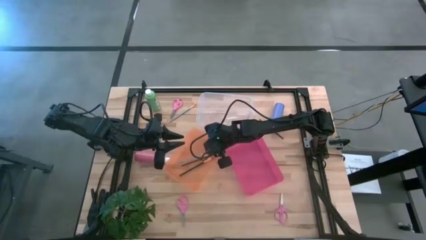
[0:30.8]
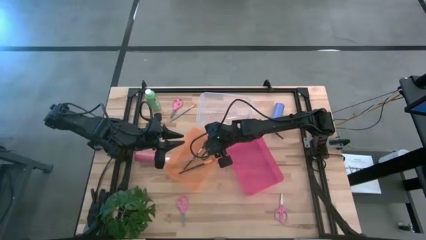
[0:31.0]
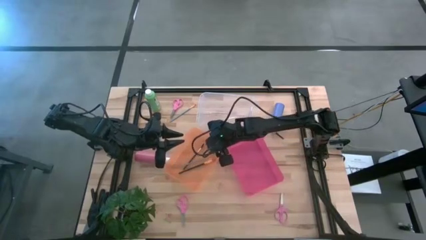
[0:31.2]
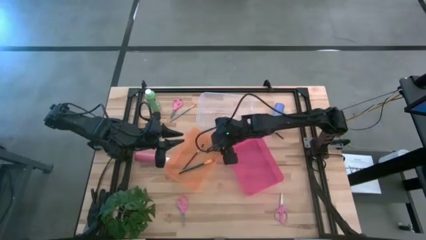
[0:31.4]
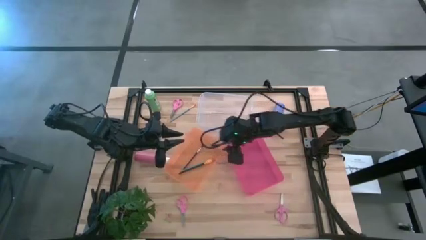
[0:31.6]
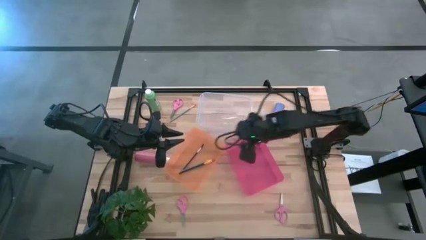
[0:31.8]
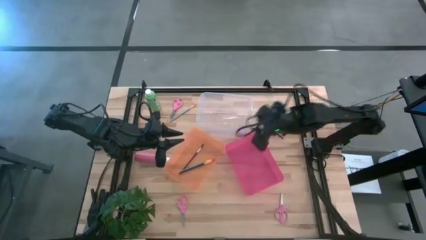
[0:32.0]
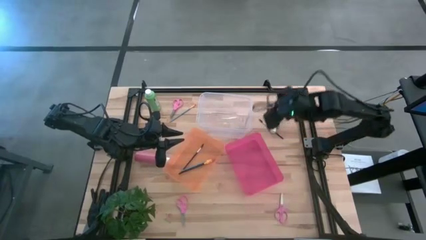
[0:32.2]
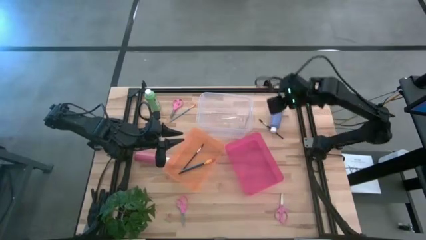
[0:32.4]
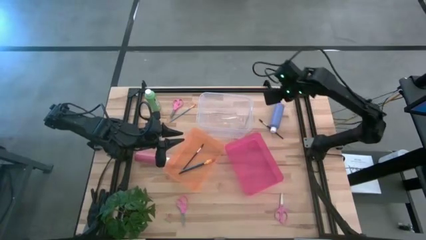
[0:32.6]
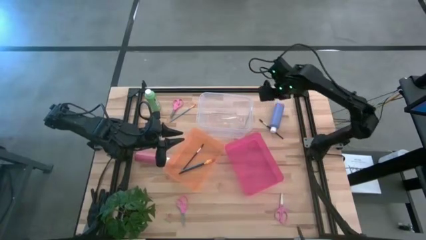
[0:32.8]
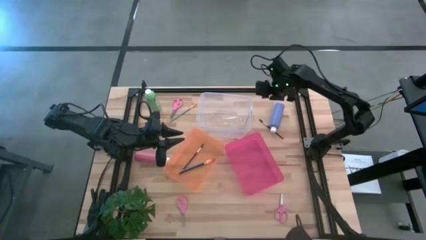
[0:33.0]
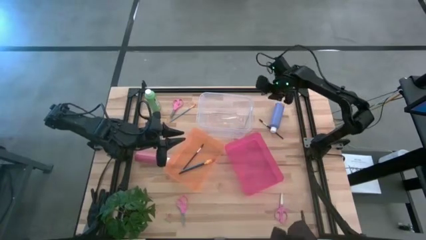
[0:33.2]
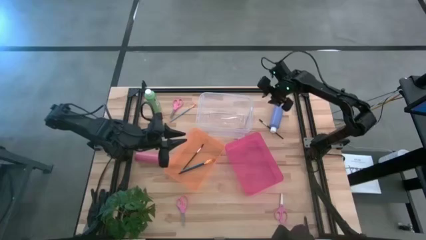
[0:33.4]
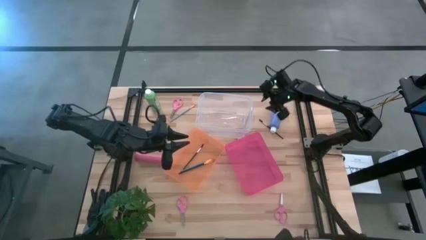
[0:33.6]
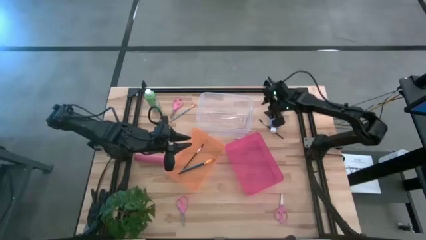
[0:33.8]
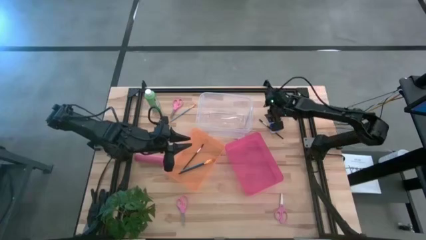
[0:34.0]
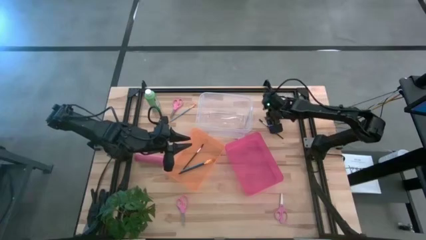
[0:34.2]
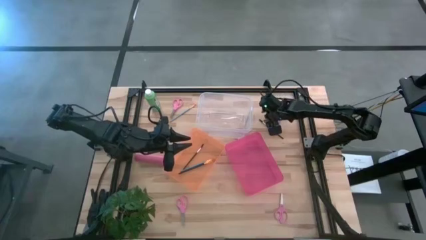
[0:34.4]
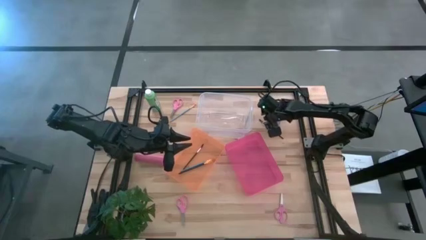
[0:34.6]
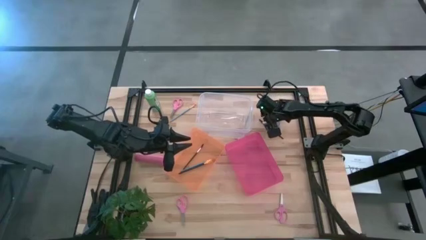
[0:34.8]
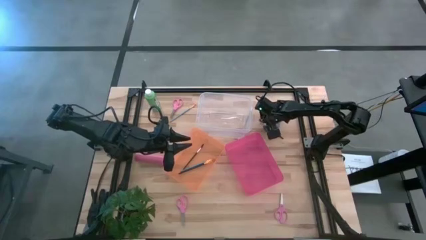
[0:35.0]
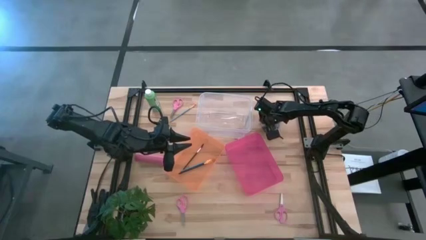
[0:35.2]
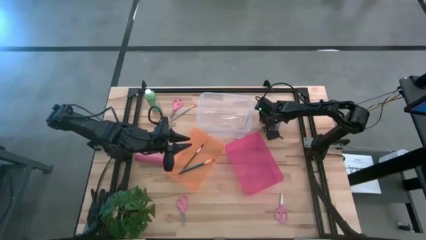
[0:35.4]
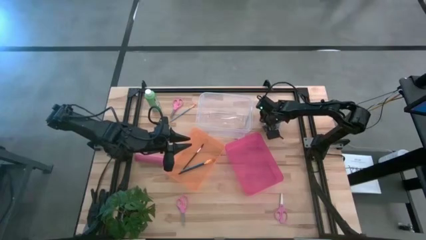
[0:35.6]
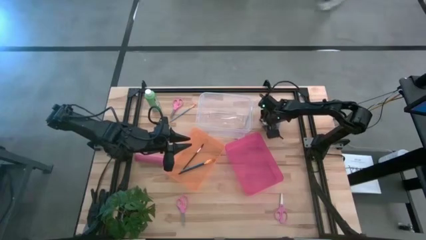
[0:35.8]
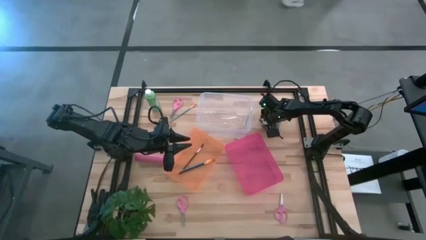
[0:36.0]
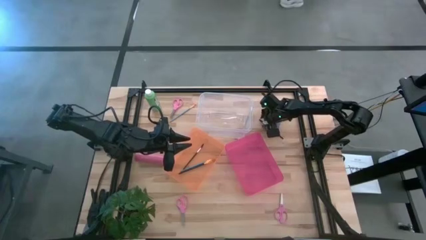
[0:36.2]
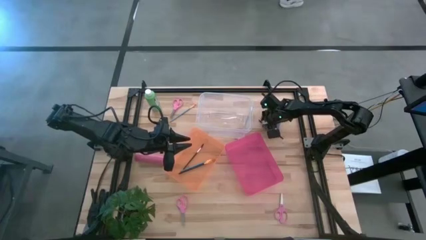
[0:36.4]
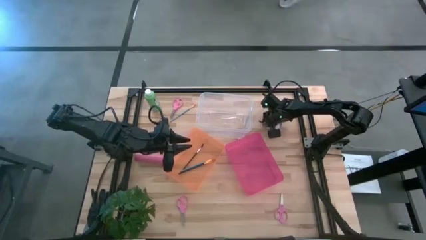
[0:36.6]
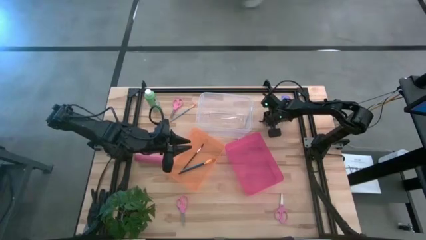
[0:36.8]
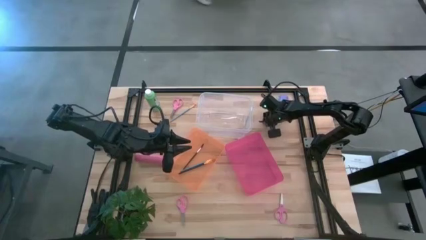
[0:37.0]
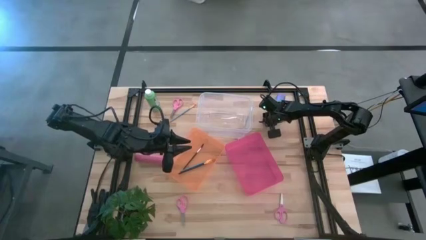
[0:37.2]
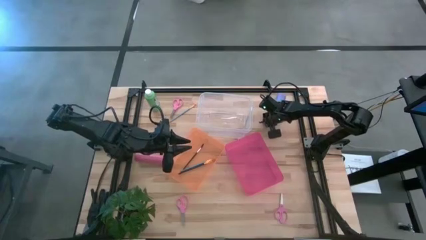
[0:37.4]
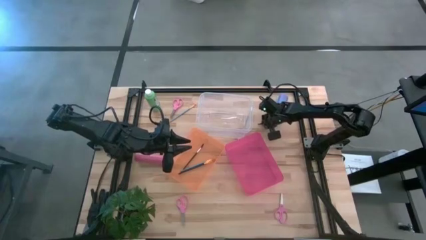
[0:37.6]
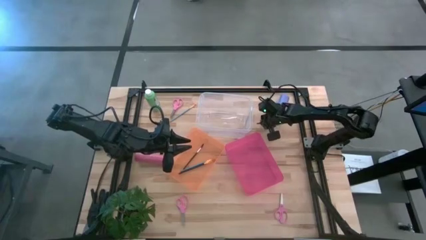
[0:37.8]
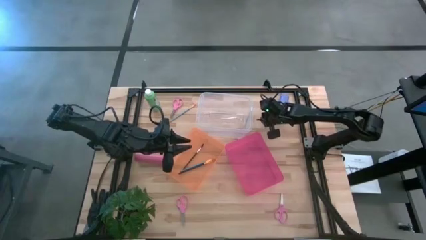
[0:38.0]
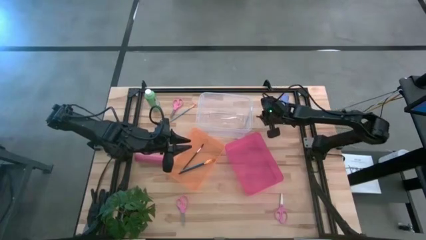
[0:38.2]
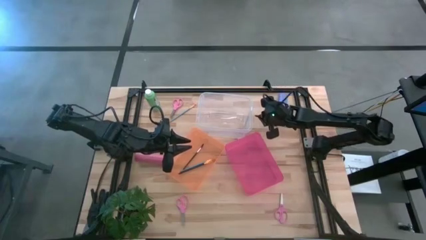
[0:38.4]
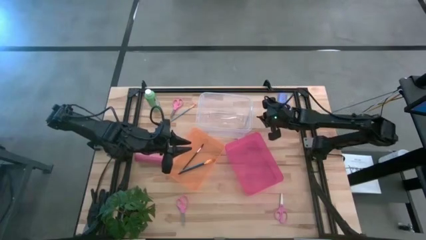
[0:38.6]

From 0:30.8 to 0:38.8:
Task: Pick & Place Paint Supplies
Put the black brow brush into the orange bin

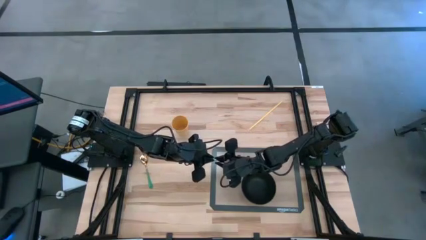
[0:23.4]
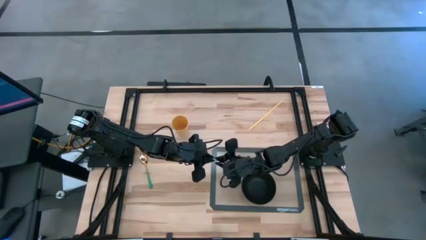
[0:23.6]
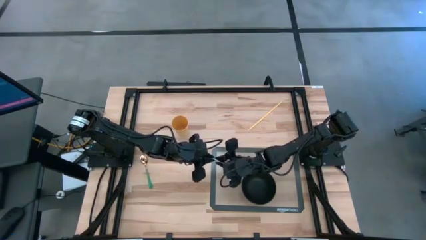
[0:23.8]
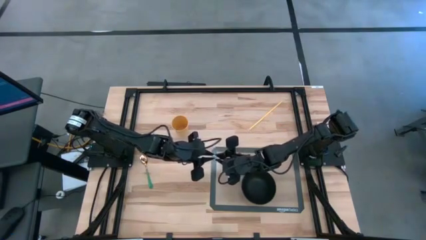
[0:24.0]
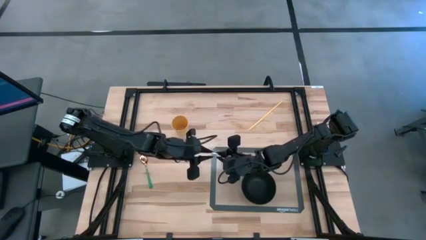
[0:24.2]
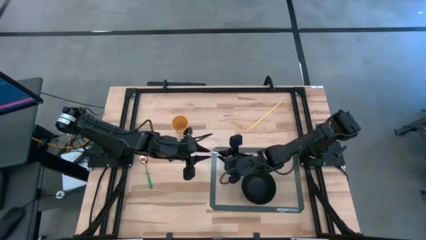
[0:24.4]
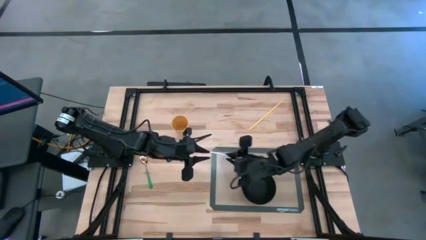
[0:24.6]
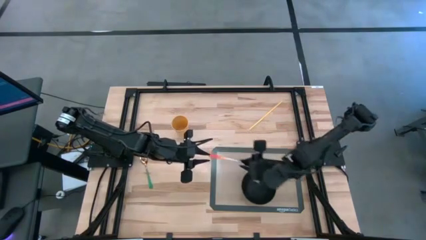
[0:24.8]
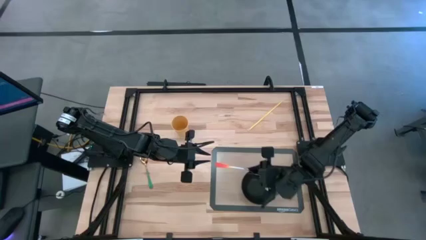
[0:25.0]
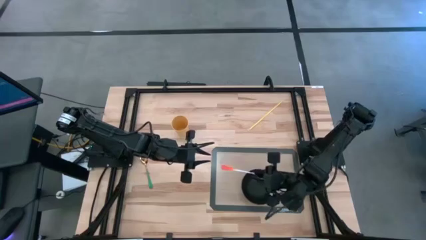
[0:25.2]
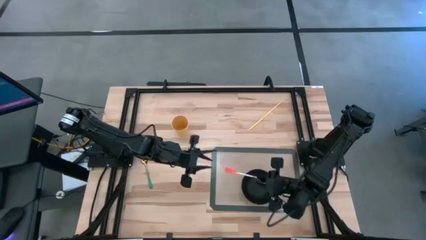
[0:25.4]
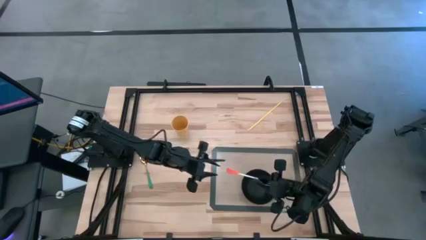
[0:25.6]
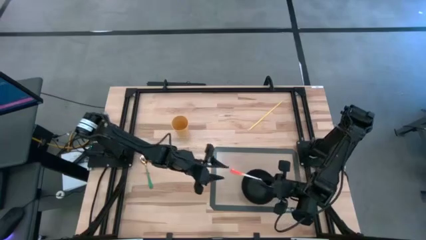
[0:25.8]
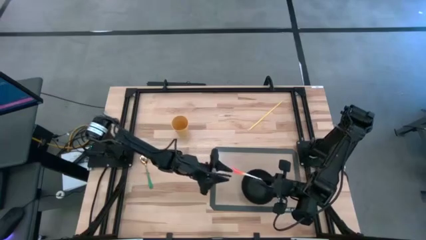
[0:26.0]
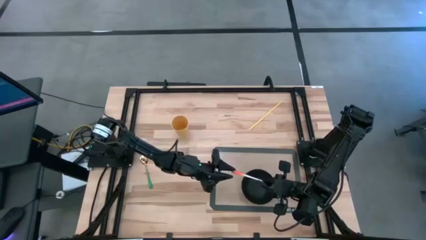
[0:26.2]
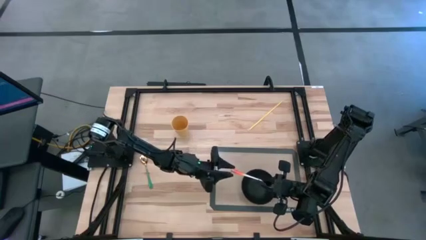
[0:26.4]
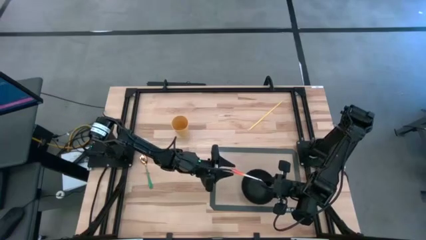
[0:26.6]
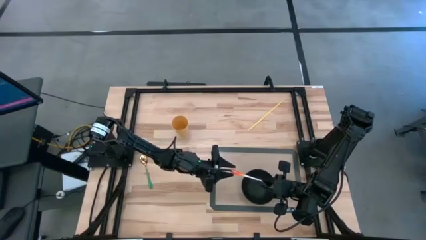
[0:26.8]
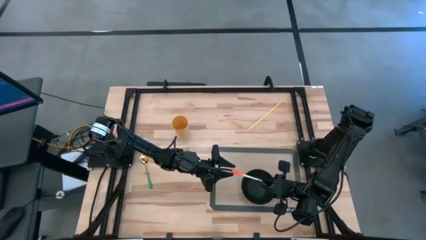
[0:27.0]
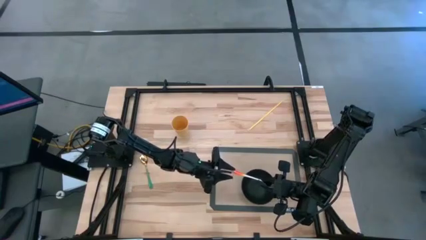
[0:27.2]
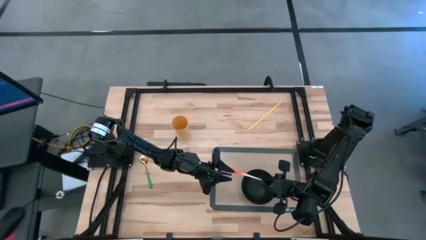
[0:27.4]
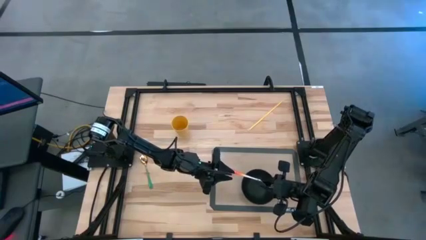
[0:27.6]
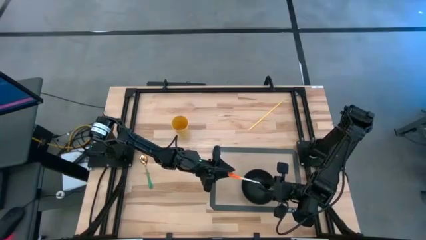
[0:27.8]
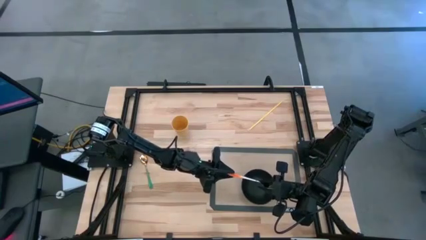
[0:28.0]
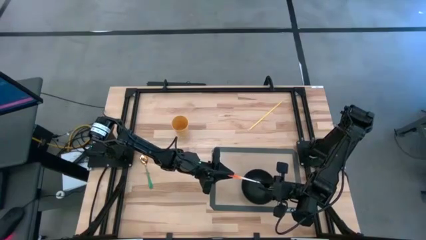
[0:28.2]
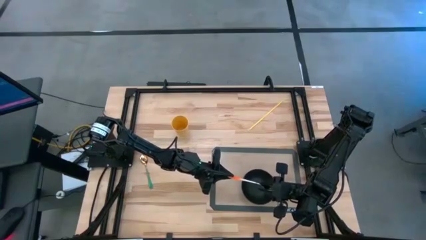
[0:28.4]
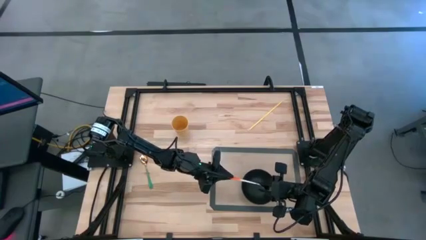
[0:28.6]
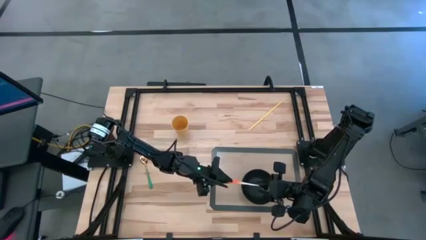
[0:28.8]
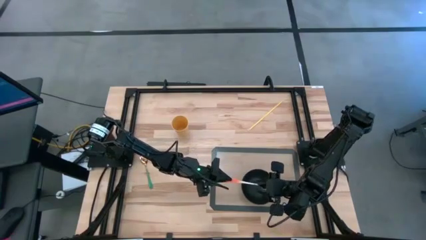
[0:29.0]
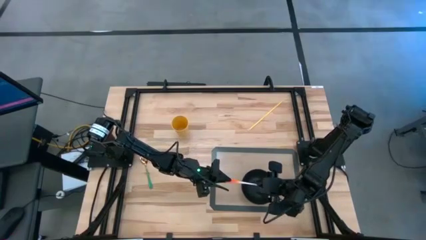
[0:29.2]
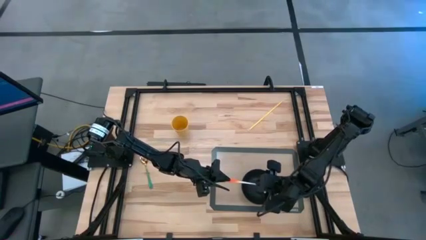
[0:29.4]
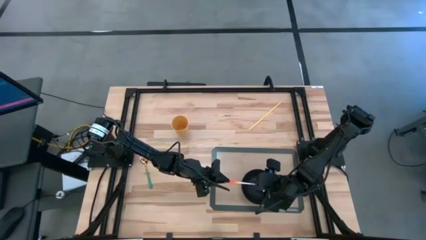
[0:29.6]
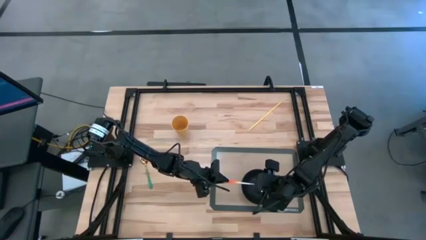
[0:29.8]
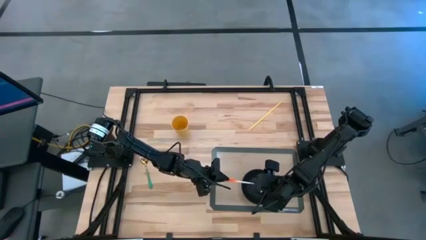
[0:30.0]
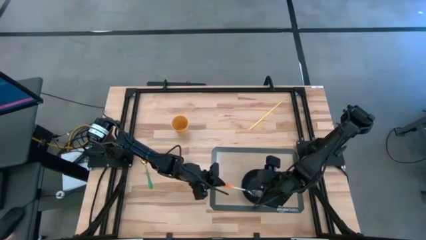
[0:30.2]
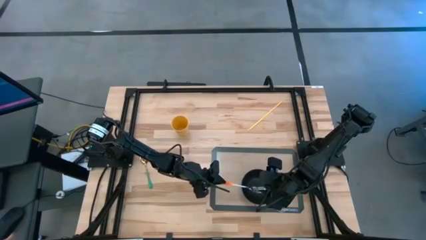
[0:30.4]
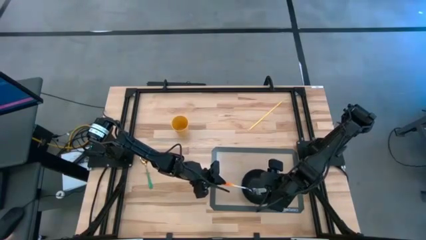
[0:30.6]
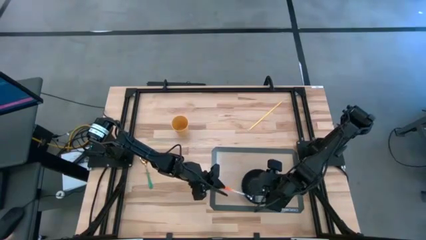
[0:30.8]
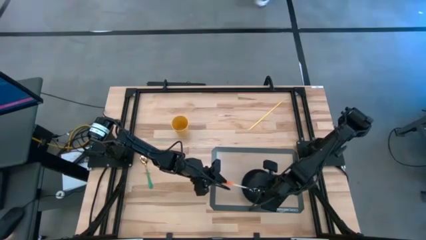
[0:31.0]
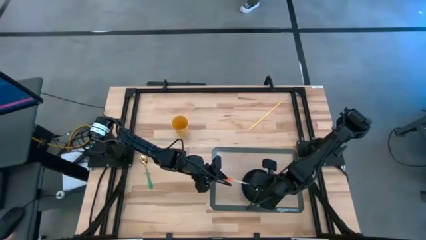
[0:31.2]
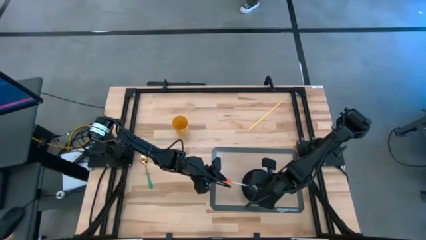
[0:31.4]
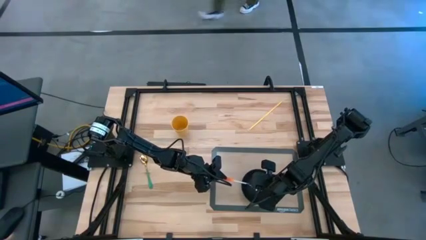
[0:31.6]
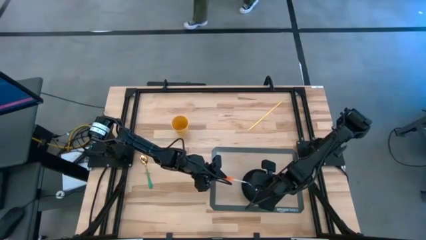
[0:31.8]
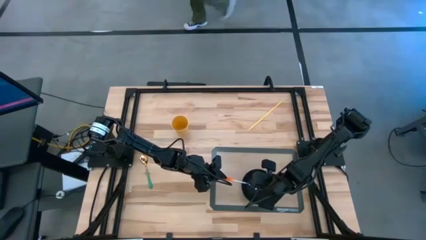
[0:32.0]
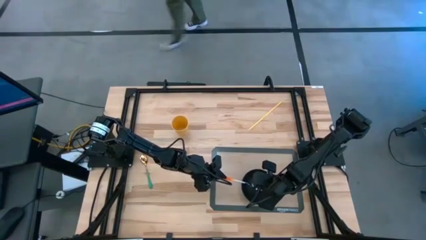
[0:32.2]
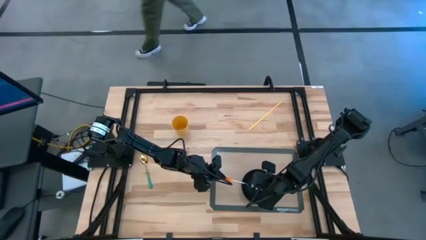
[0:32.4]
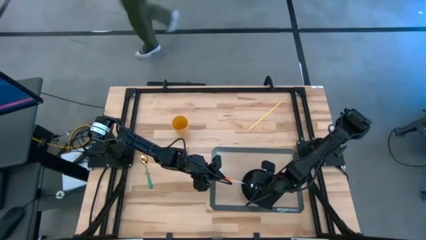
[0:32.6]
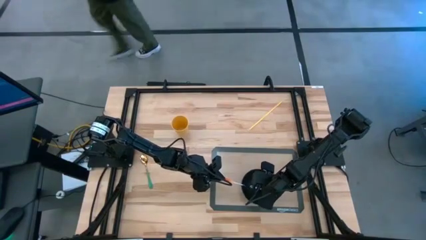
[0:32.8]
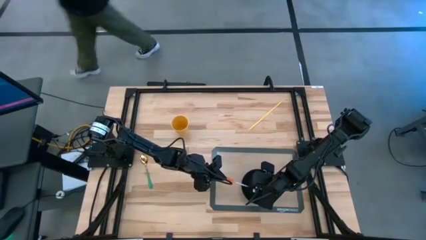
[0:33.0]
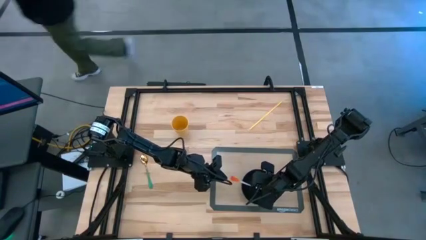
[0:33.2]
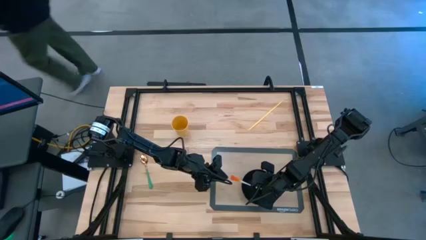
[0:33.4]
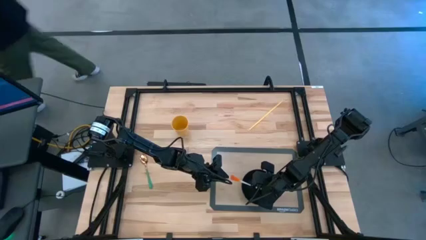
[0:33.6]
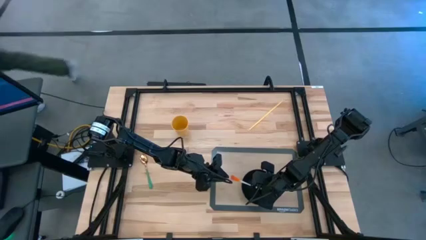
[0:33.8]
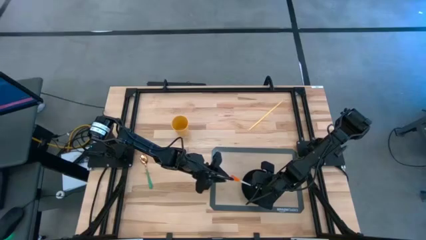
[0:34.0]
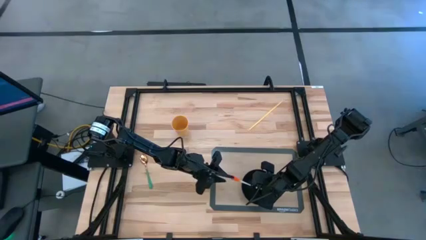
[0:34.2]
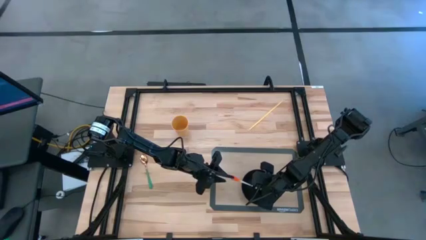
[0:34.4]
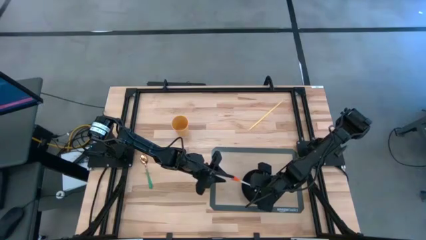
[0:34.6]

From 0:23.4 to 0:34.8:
Task: Pick & Place Utensil
Put the orange silver fork into the black bowl on the table placemat
